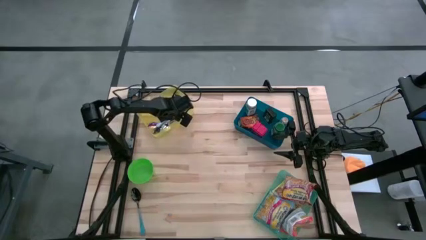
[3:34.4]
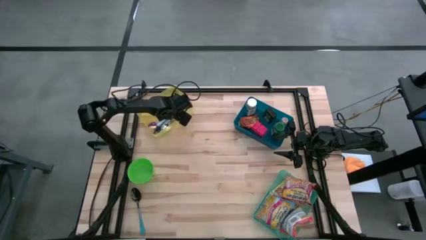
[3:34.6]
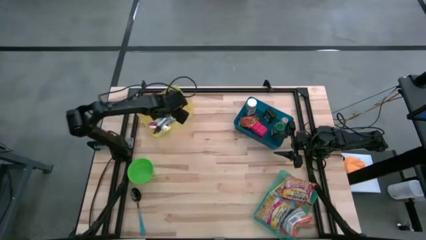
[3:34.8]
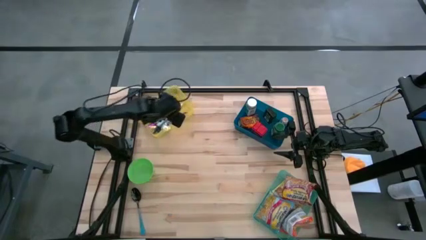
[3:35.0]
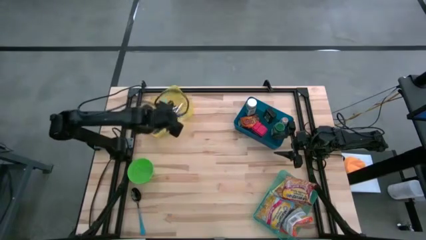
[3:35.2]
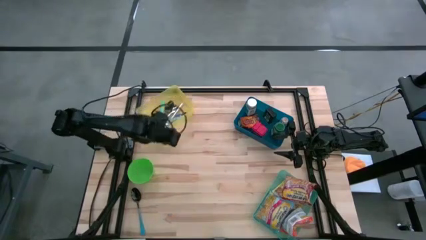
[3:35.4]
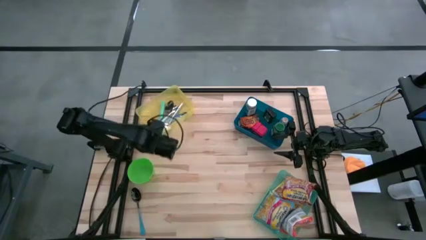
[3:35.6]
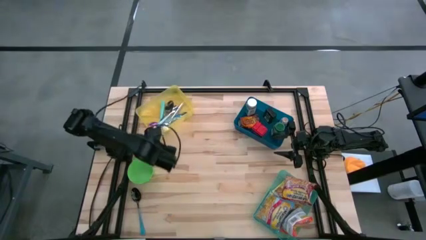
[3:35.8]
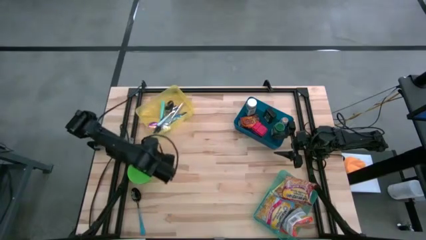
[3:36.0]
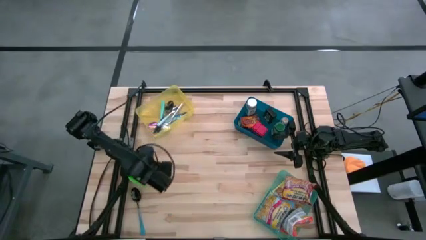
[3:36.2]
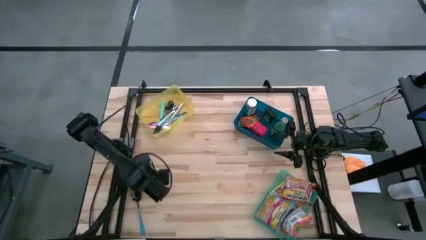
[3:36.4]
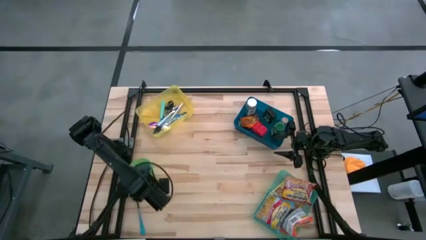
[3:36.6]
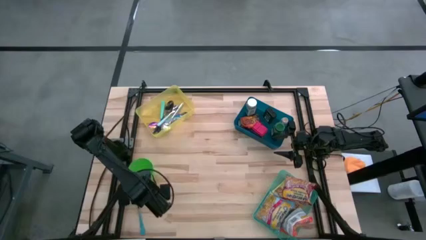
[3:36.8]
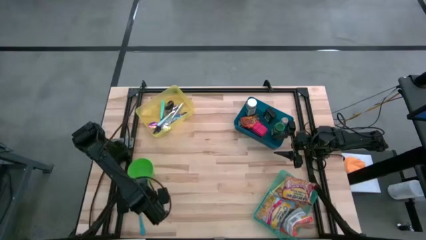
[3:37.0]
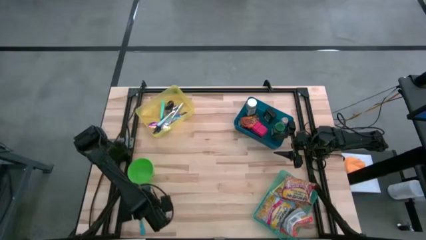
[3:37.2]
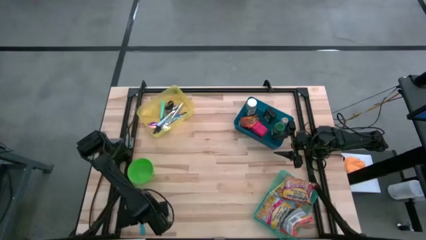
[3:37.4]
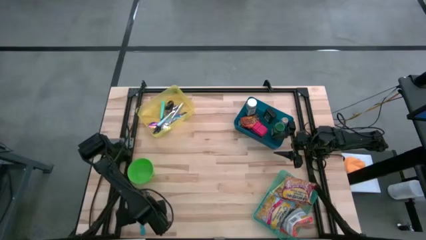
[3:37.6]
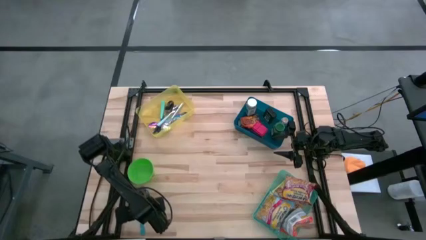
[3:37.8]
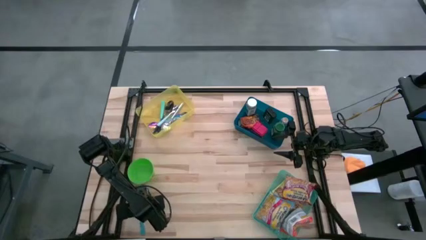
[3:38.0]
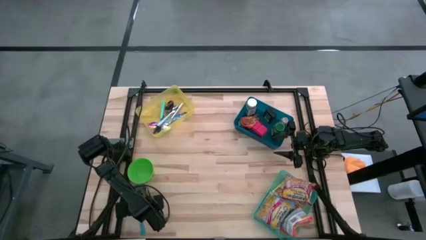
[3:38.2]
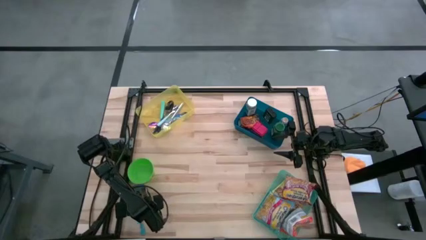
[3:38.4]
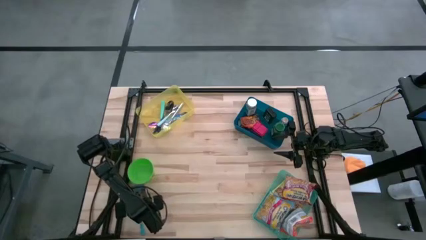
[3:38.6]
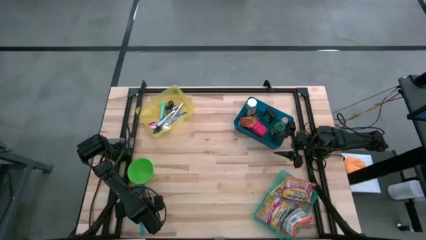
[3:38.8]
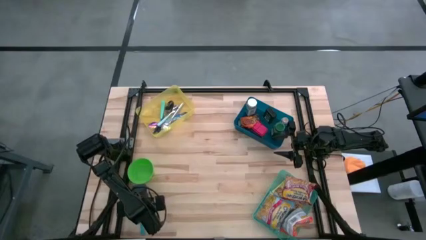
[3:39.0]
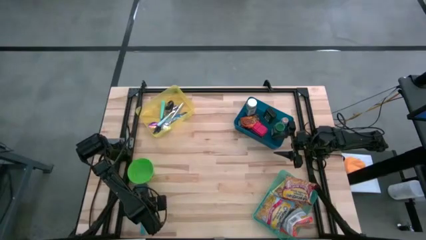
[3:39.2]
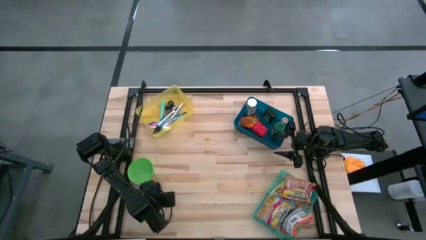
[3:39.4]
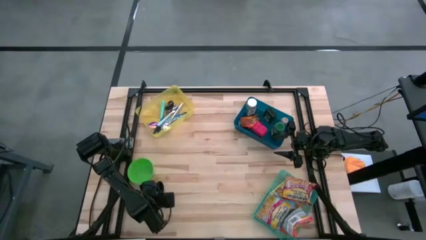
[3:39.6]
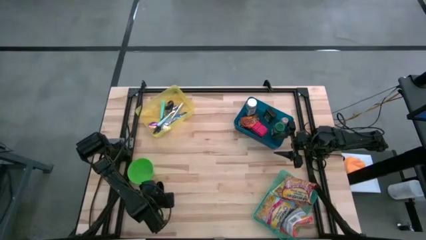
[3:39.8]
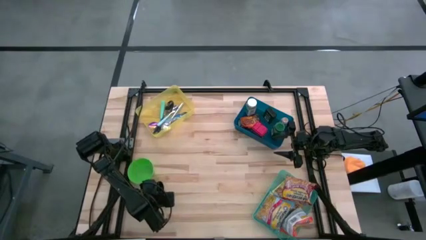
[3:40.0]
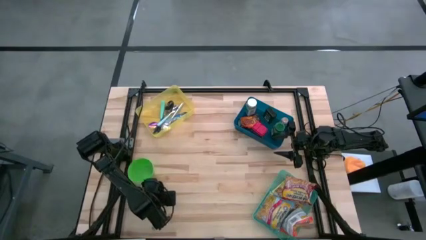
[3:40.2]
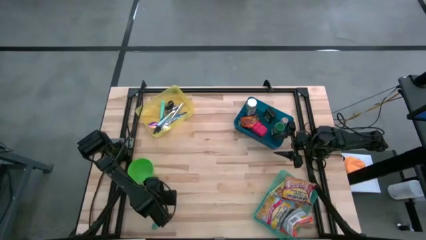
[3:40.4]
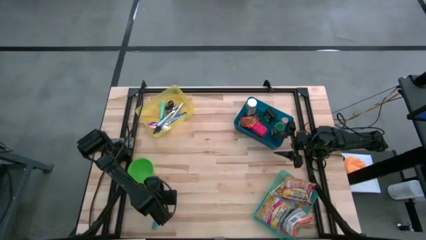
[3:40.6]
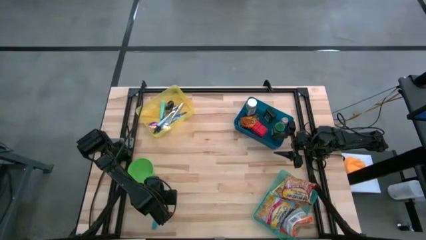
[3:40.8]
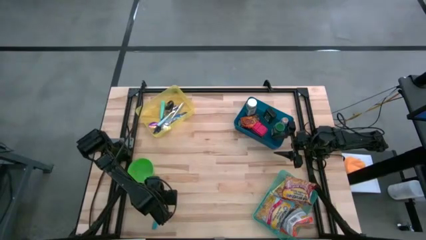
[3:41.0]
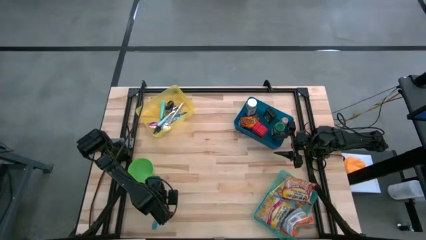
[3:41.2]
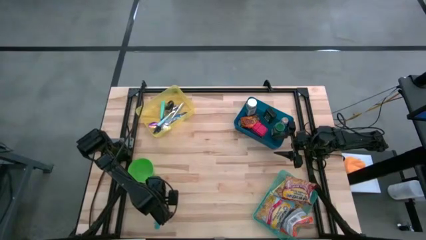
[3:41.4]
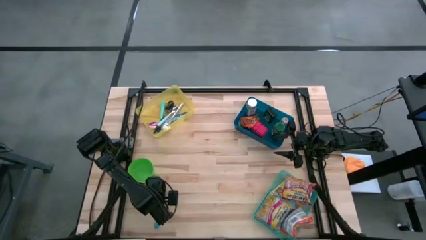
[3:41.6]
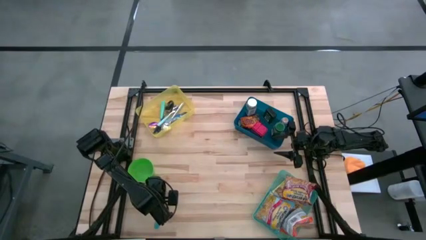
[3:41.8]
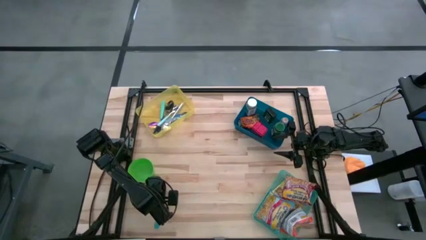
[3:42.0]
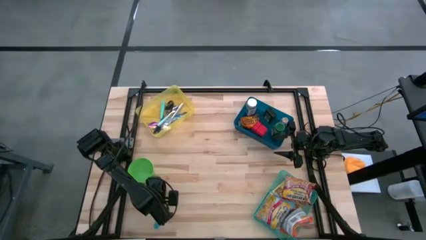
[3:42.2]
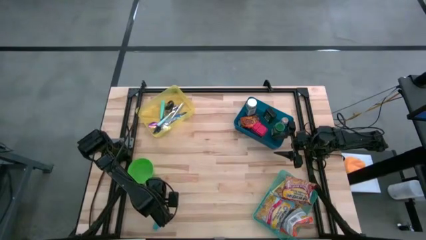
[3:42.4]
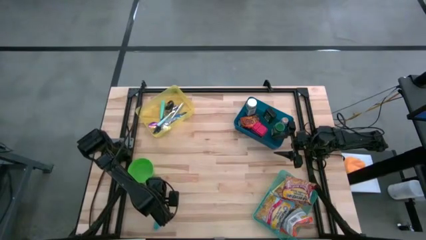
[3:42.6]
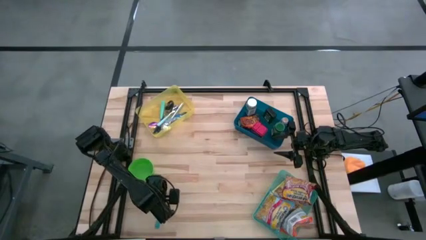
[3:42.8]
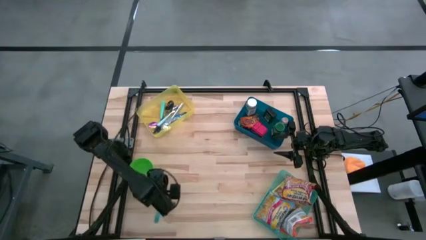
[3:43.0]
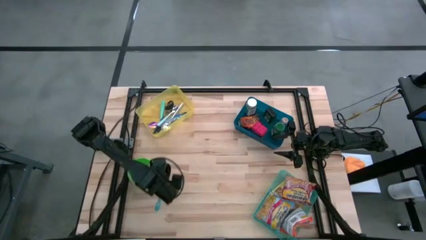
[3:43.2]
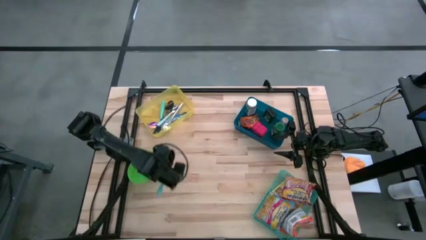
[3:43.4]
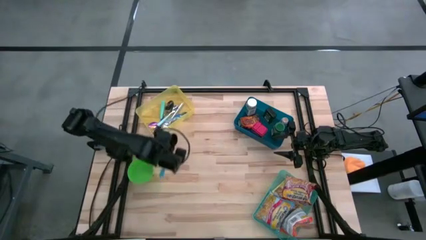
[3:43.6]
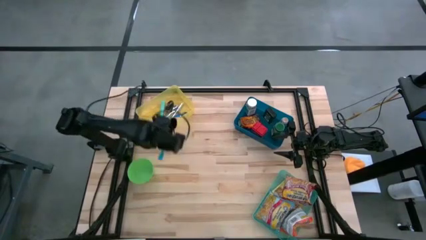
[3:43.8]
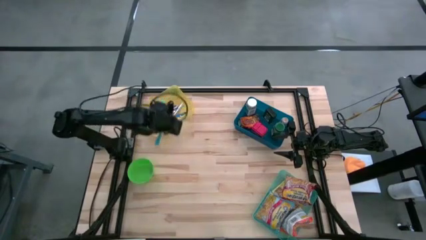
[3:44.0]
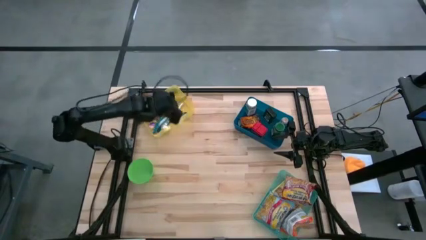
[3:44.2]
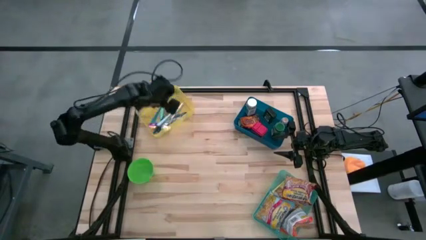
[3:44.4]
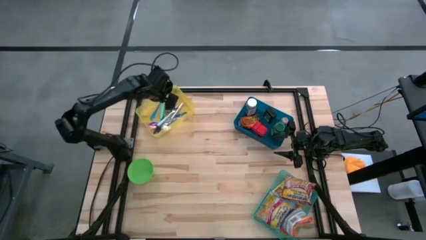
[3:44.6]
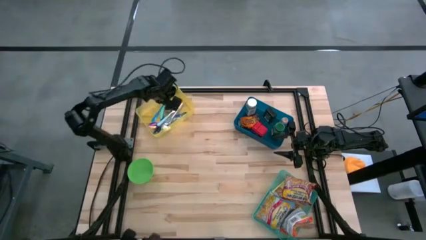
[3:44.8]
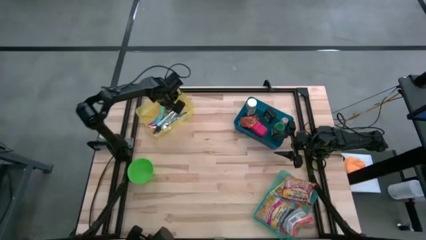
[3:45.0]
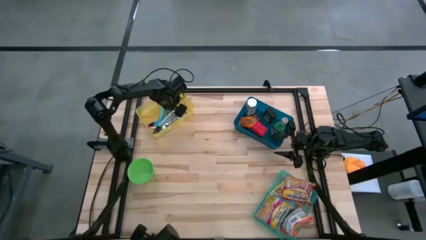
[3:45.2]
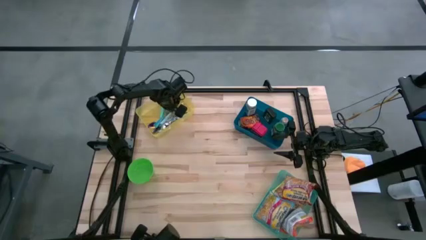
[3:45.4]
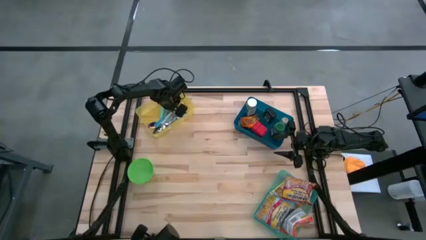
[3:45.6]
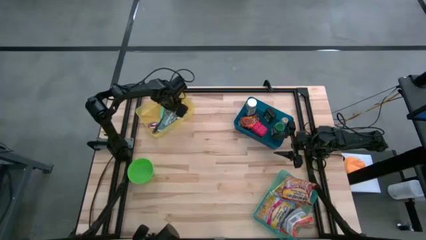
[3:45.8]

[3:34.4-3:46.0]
Put the dark blue spoon into the yellow bin
